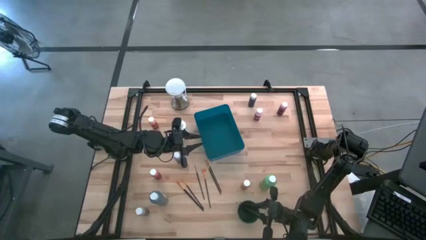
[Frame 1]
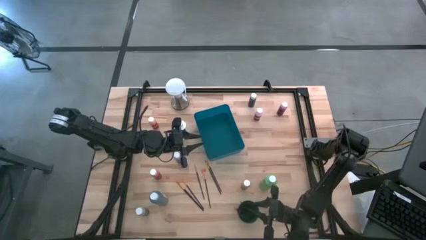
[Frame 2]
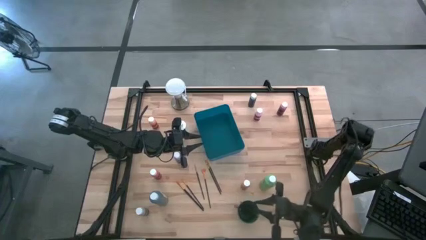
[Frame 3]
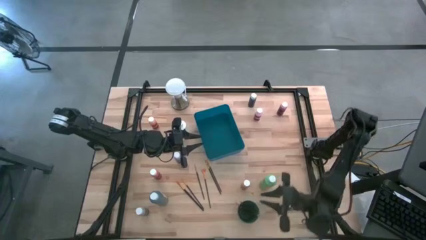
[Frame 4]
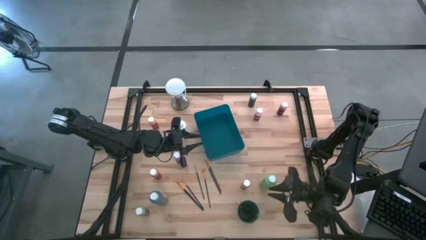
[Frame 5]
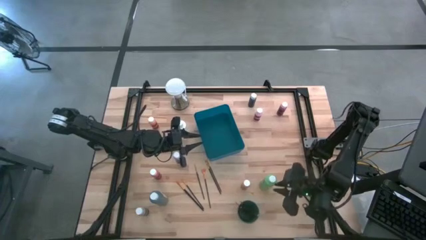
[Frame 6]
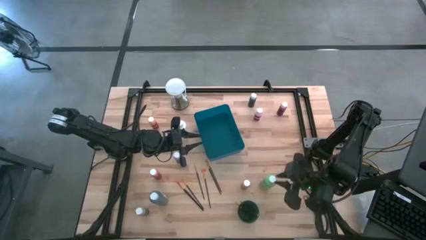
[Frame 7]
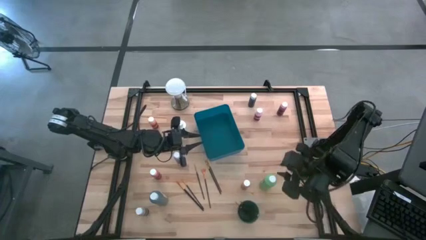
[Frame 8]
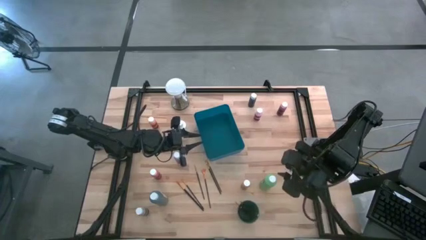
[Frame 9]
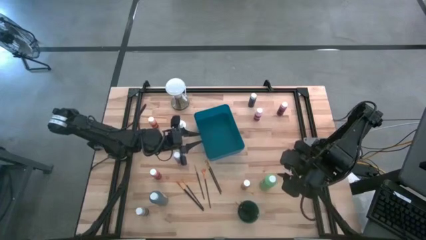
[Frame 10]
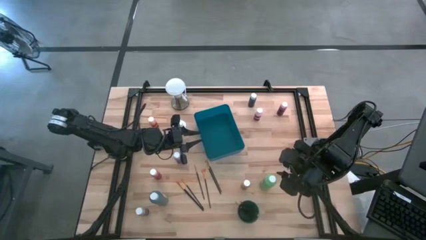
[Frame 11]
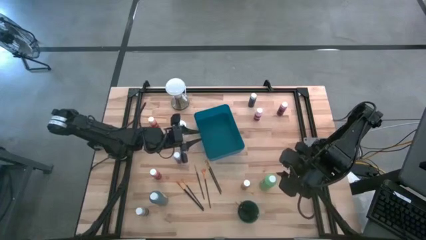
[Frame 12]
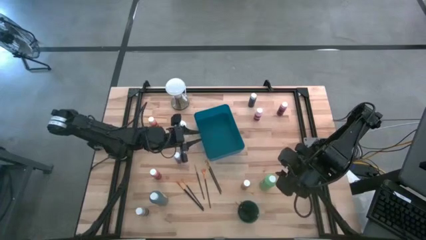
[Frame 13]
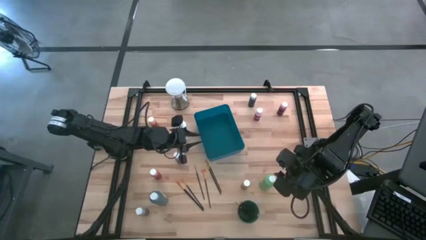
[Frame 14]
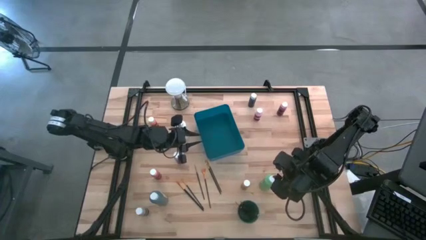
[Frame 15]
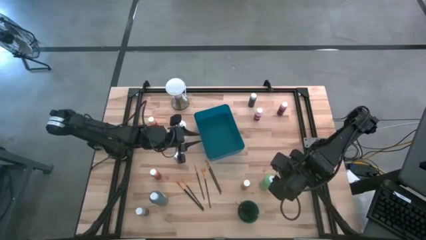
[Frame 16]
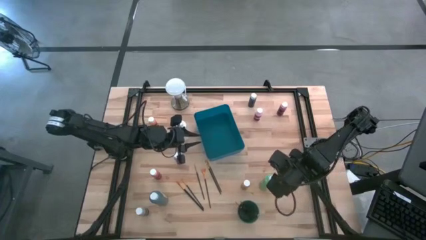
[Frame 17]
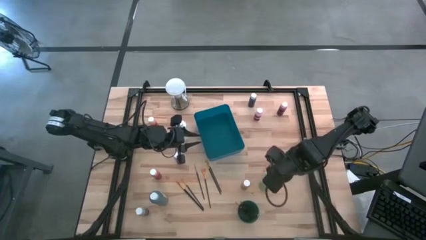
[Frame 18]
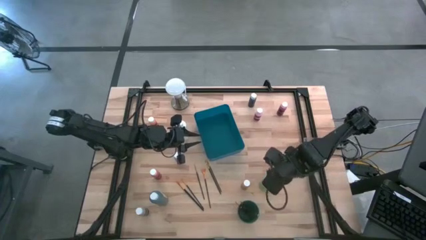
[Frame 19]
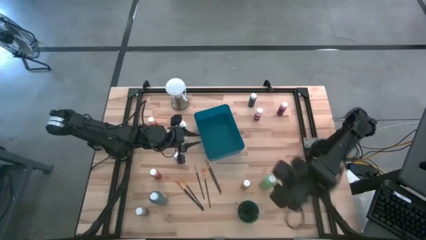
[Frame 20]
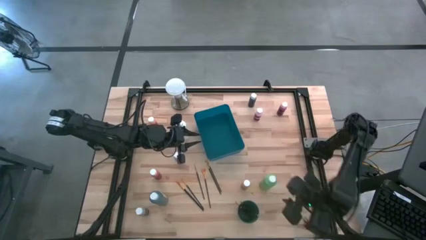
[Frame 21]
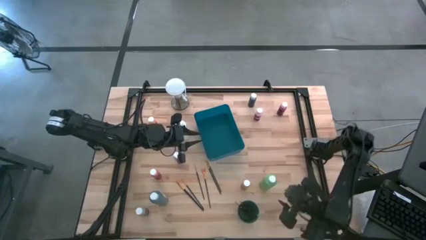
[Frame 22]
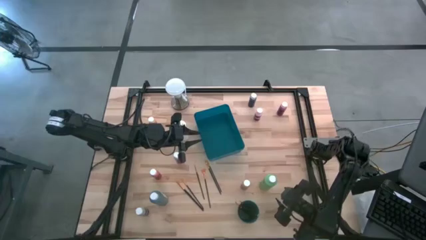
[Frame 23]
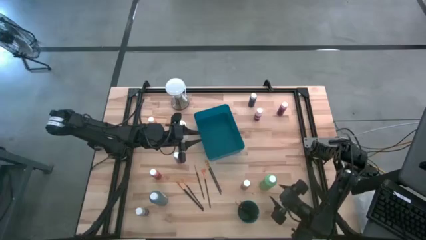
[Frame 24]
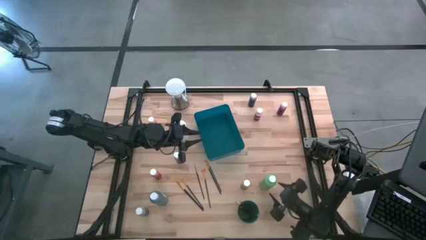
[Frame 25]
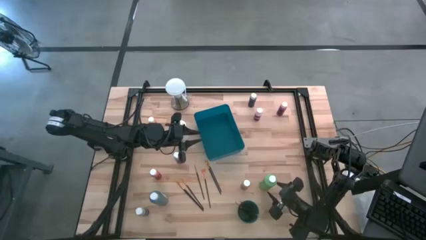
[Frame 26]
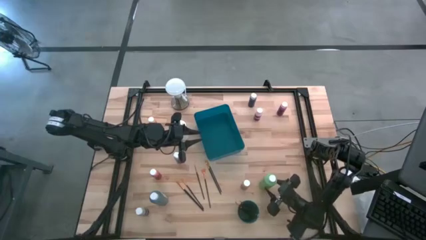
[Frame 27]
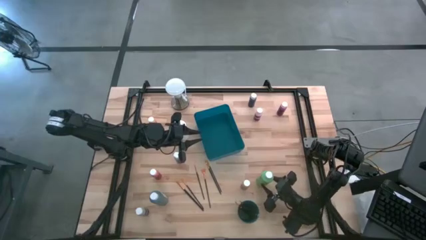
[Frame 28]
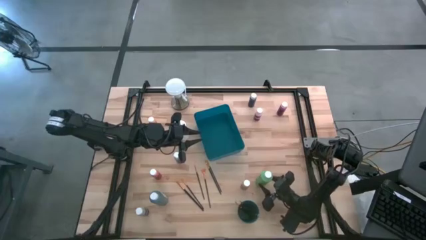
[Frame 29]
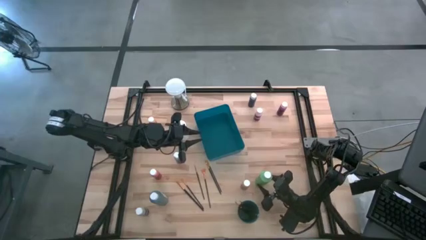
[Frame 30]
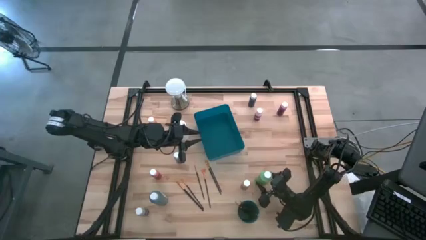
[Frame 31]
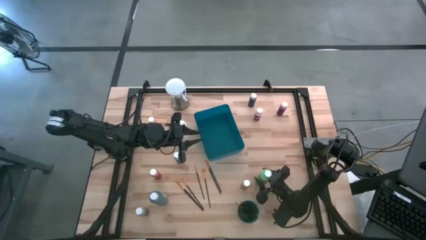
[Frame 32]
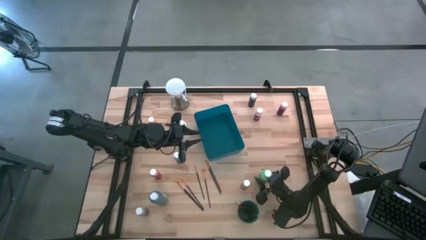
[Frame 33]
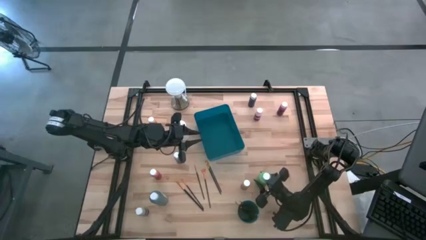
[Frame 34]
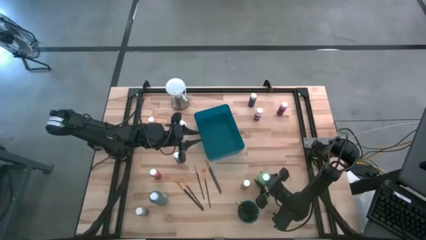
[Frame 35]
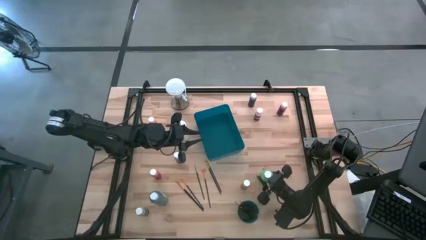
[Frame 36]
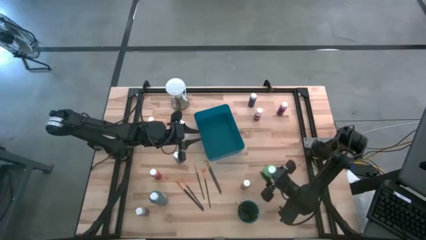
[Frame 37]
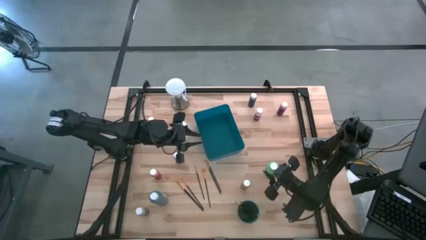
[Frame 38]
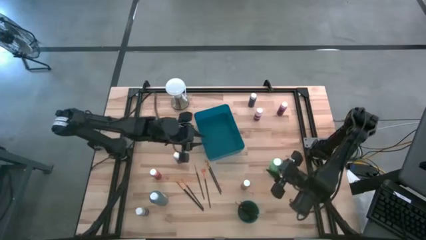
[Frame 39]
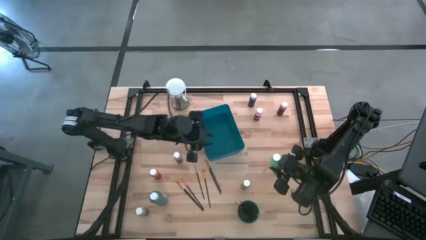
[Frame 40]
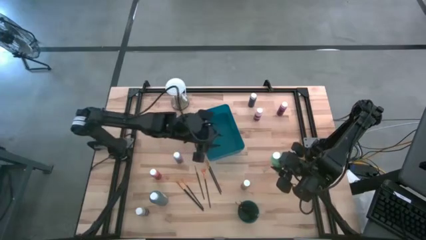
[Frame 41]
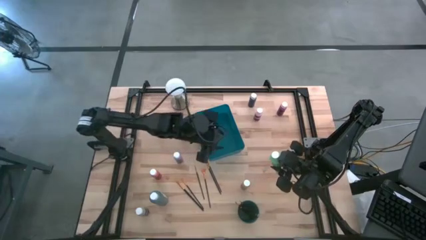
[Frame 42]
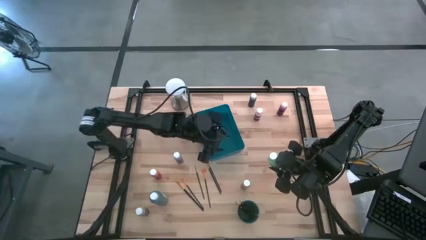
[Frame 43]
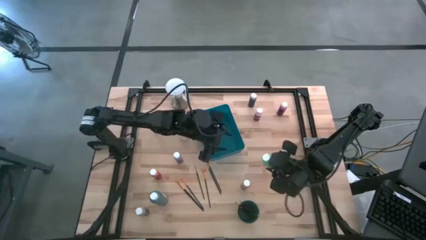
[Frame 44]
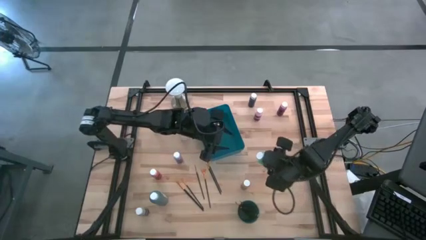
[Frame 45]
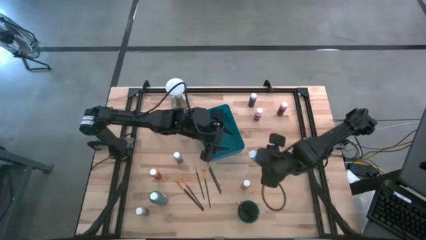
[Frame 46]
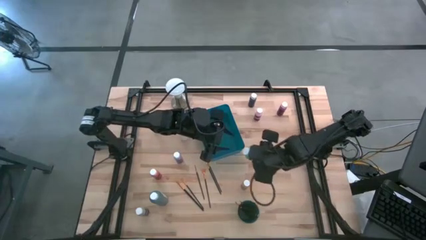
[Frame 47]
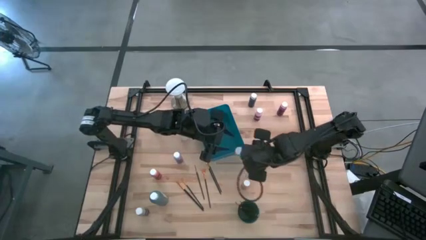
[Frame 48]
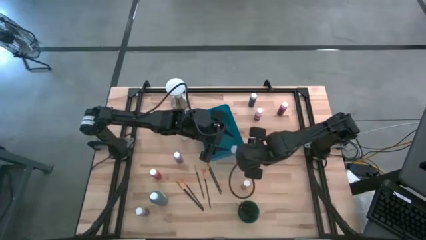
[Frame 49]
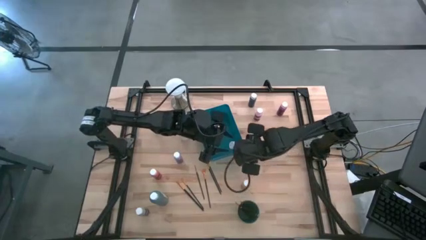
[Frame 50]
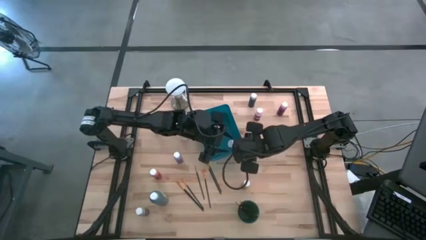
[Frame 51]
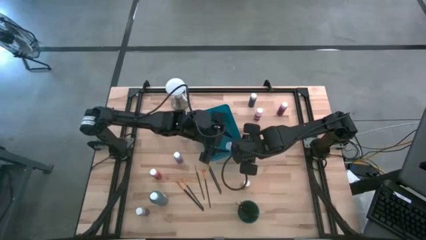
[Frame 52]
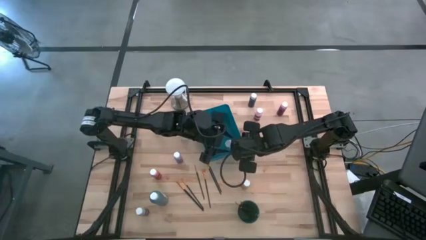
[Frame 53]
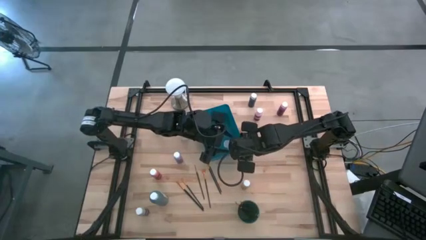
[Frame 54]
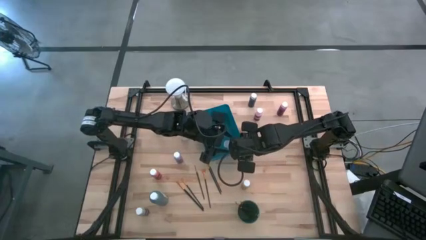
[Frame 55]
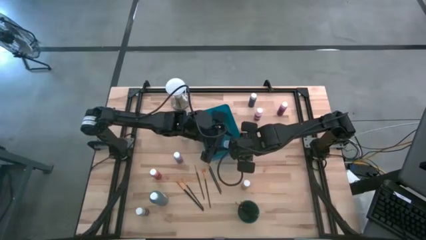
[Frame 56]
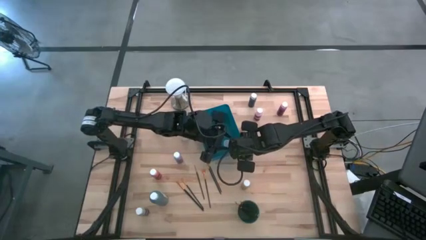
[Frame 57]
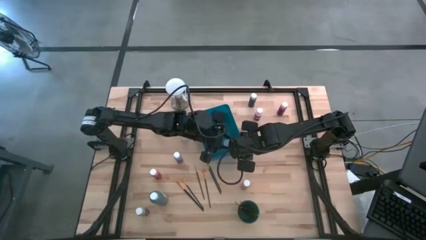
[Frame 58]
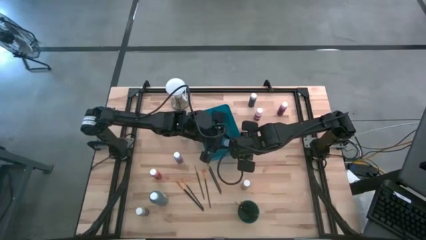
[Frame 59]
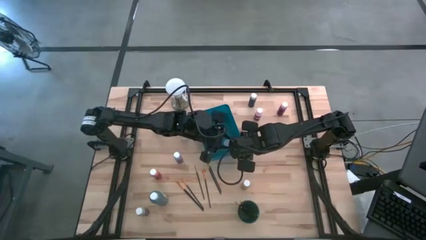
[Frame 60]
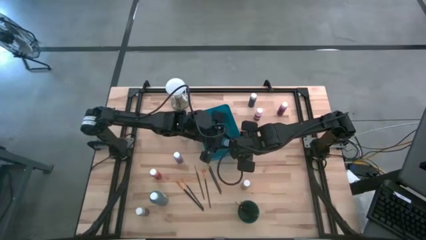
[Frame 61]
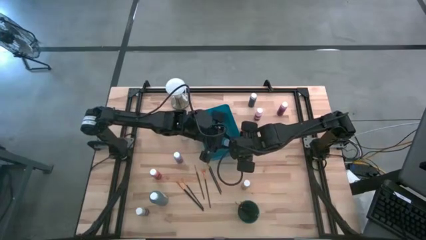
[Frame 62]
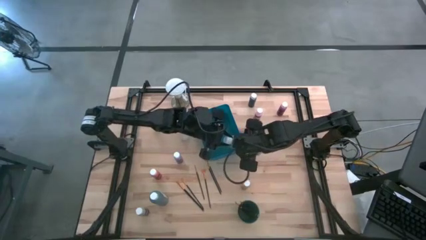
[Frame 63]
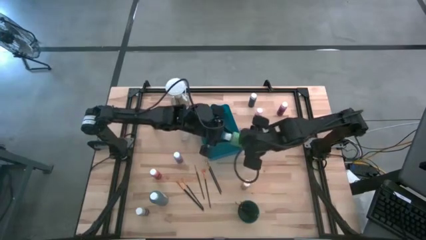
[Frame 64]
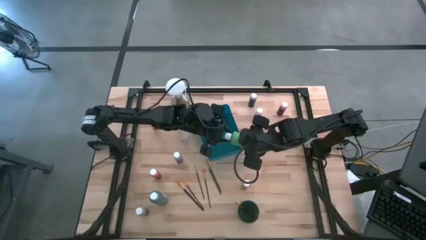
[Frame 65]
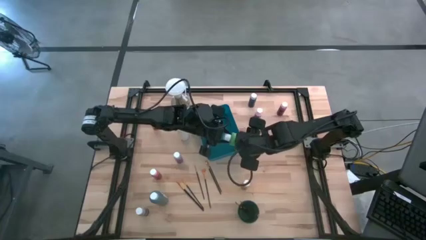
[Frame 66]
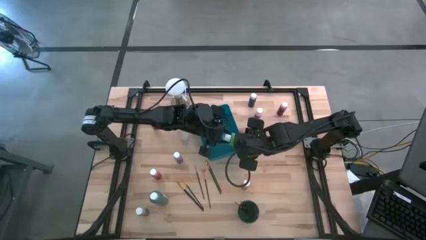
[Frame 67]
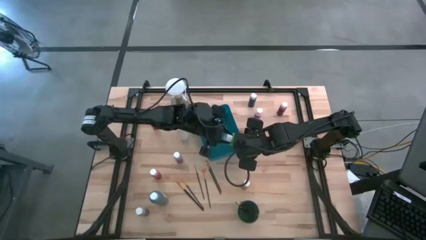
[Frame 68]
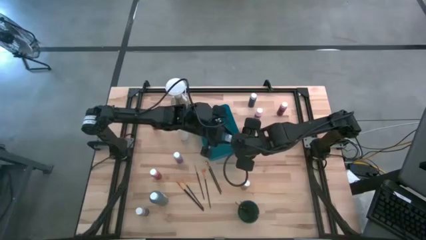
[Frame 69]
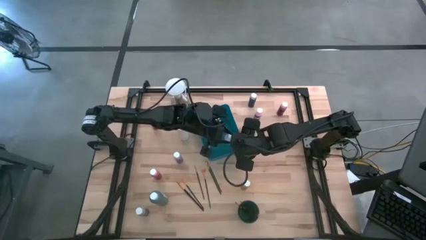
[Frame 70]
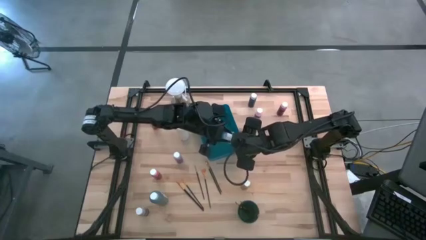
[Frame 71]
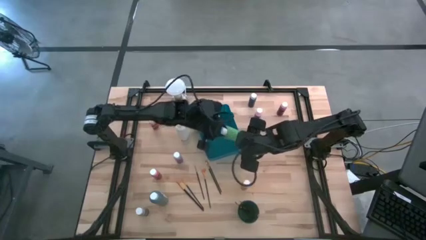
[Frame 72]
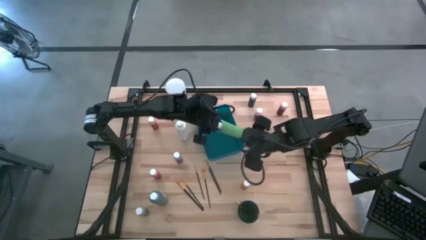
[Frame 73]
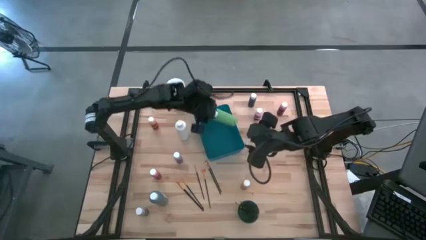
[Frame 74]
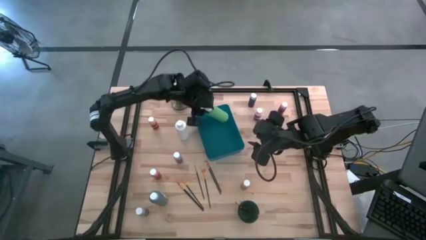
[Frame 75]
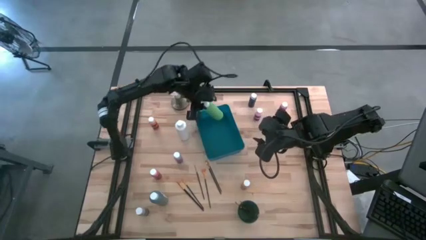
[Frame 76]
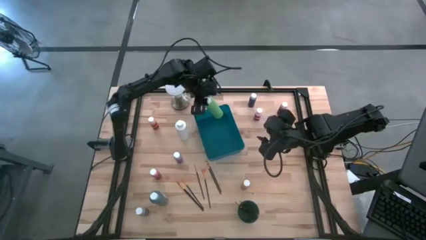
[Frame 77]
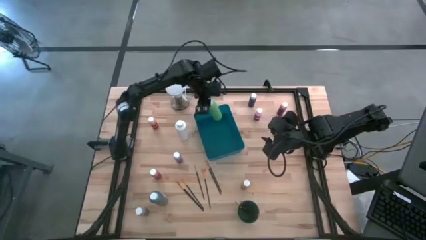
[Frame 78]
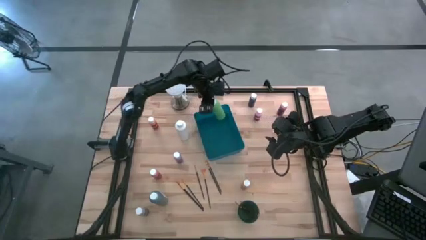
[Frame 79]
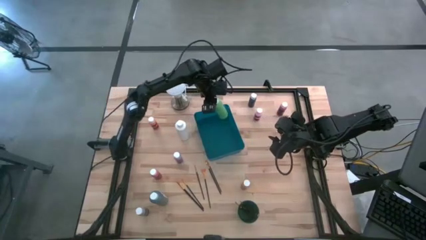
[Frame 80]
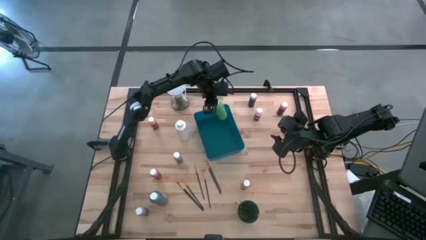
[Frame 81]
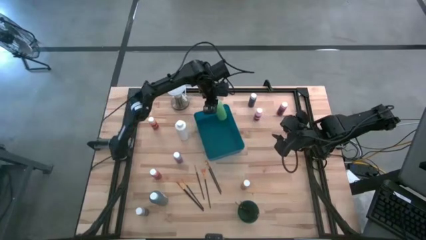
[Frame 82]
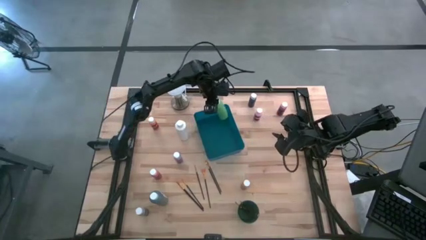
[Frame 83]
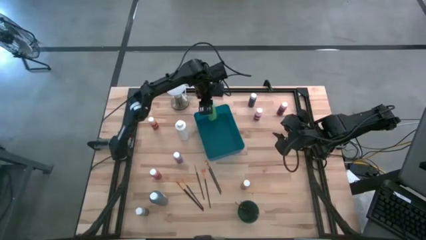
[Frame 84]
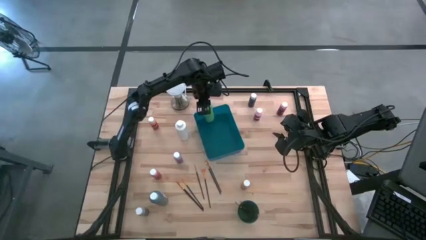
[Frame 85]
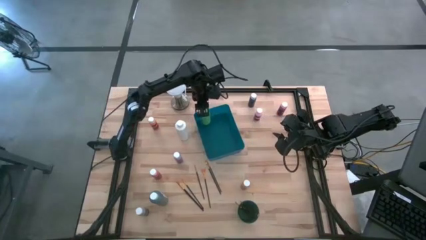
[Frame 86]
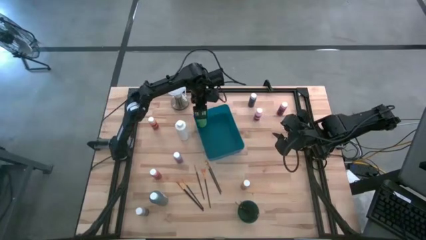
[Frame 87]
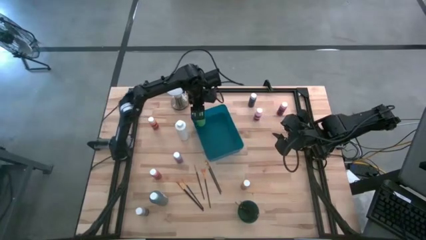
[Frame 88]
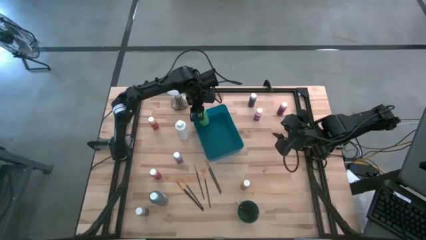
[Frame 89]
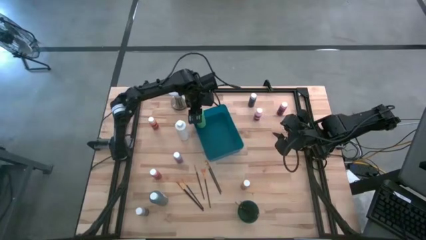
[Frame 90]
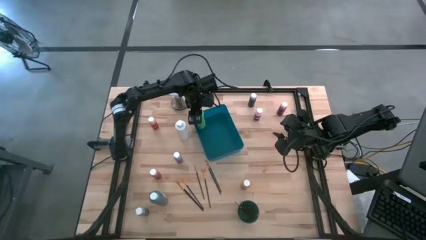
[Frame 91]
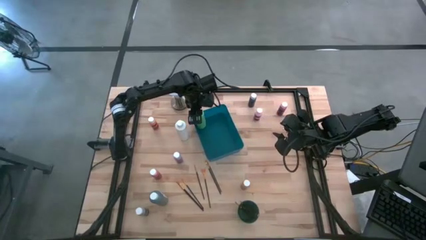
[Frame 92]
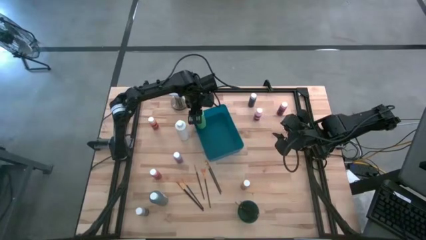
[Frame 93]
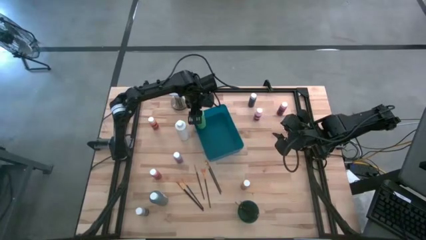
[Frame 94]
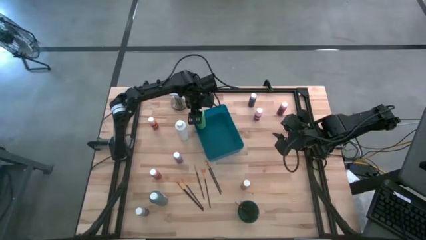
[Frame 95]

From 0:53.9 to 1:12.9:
Task: Pick & Place Paint Supplies
Put the green paint bottle into the blue bin
